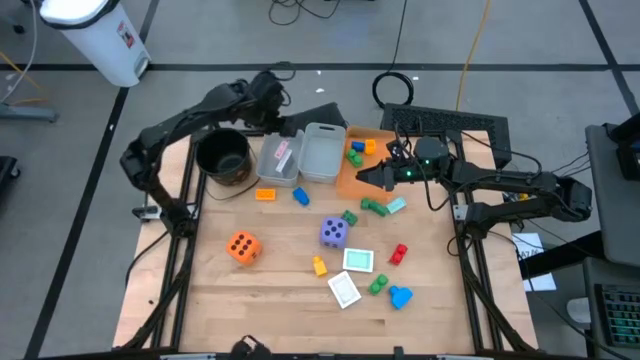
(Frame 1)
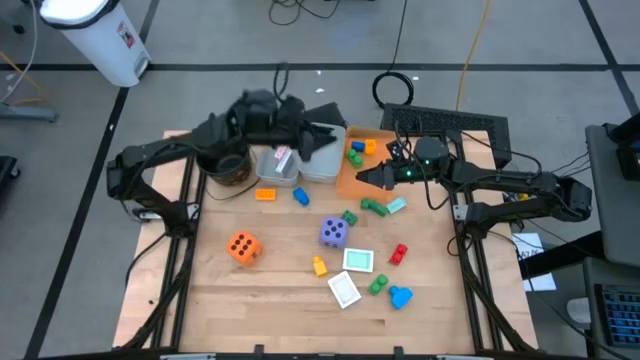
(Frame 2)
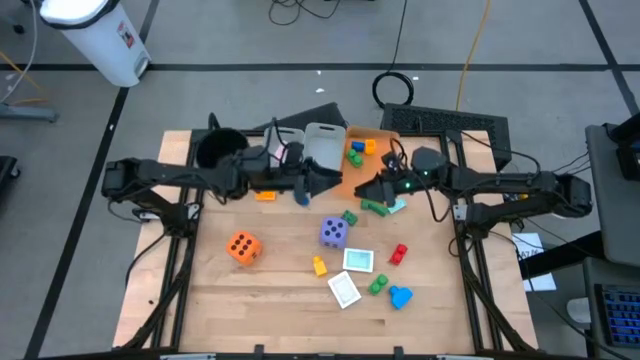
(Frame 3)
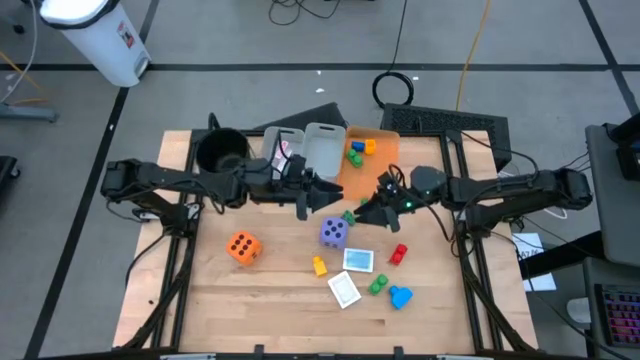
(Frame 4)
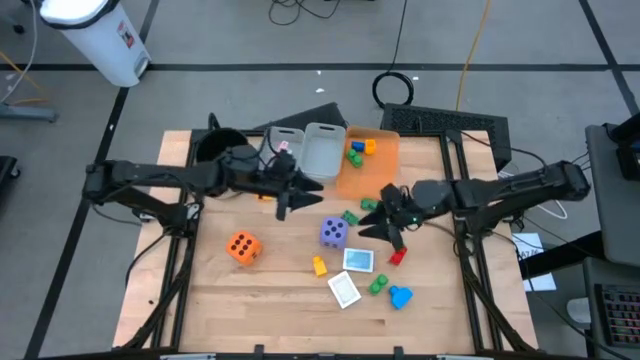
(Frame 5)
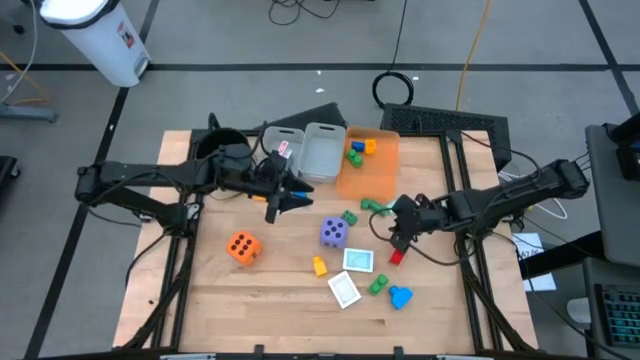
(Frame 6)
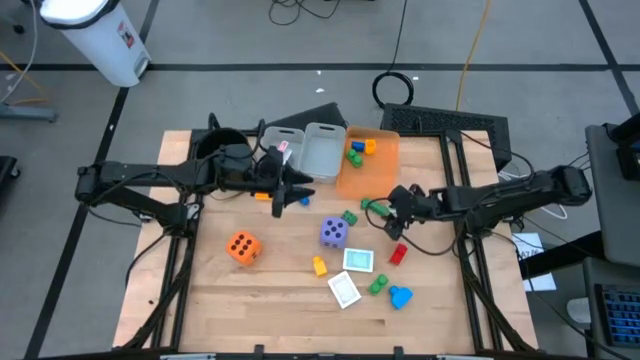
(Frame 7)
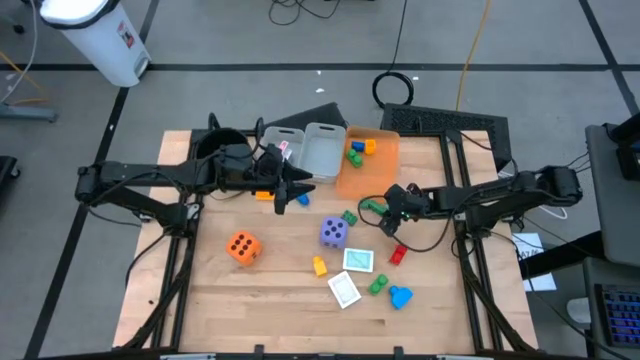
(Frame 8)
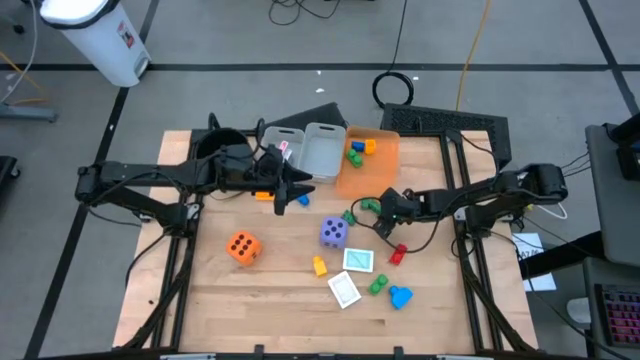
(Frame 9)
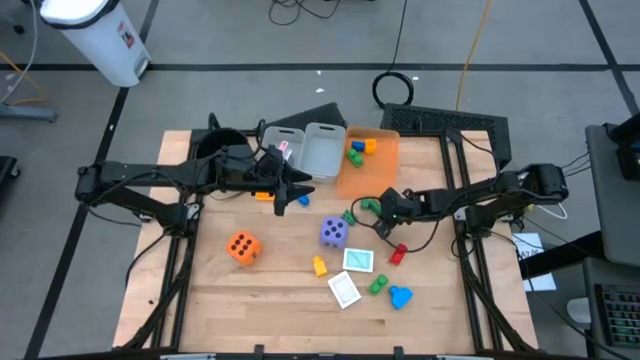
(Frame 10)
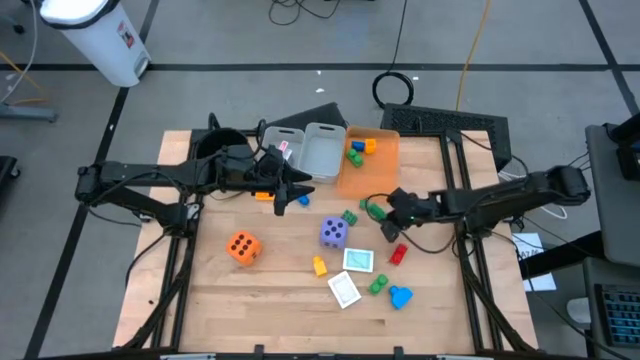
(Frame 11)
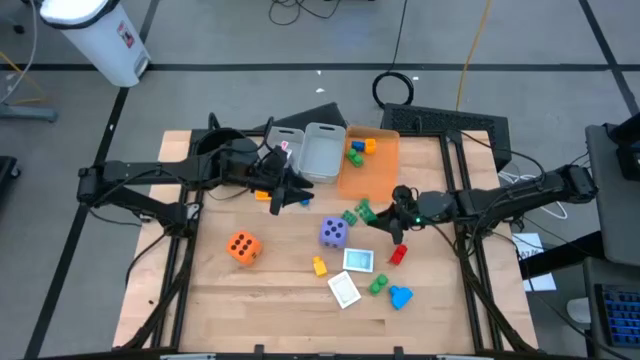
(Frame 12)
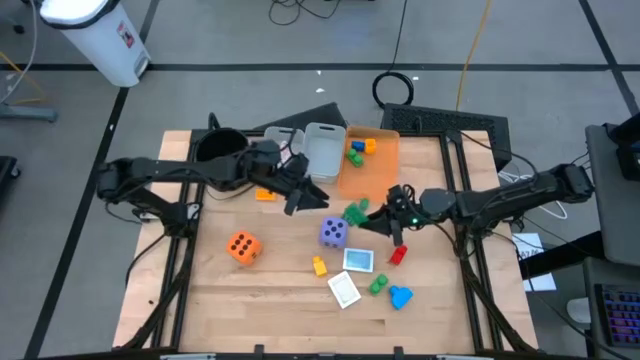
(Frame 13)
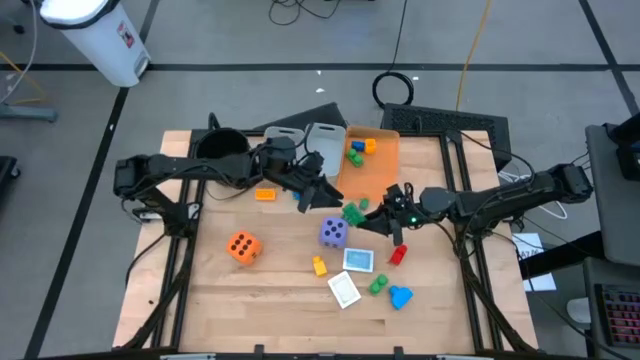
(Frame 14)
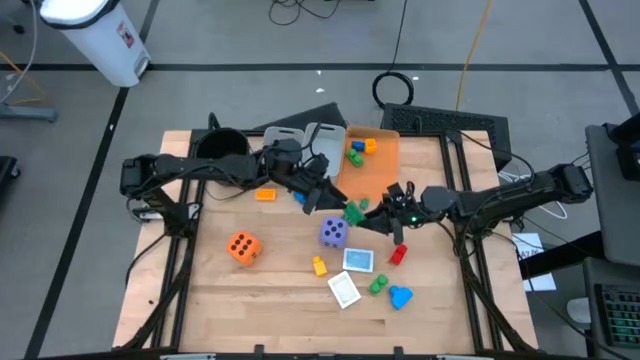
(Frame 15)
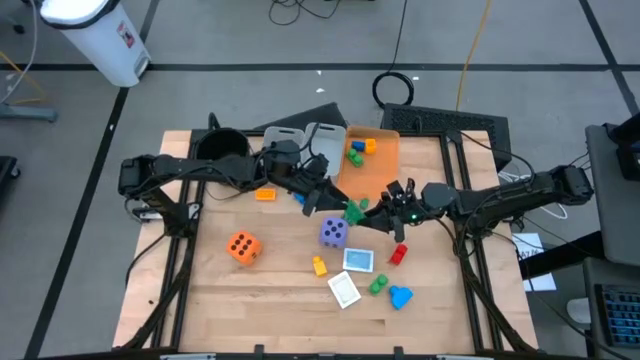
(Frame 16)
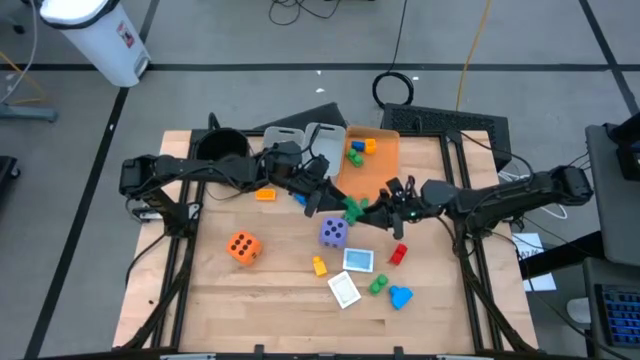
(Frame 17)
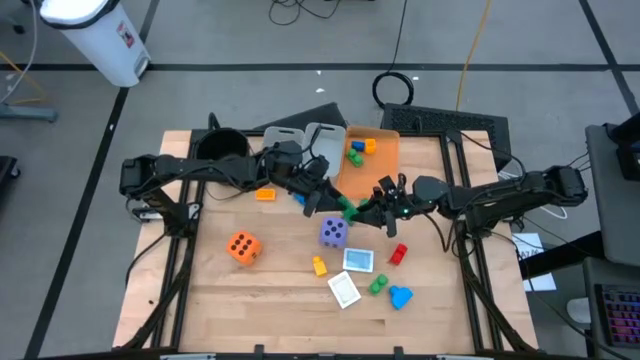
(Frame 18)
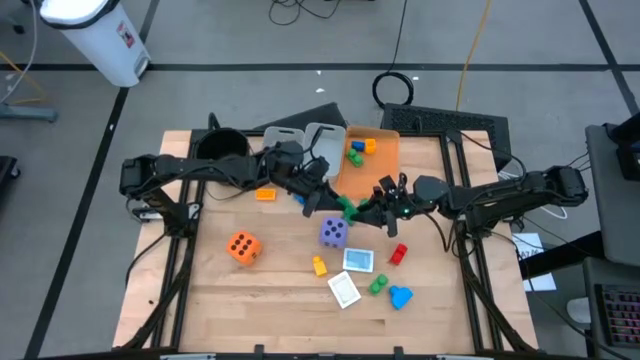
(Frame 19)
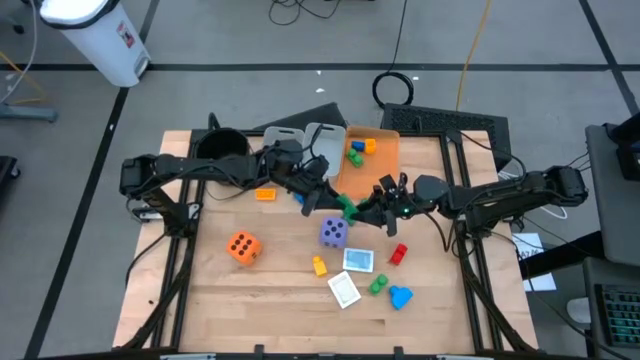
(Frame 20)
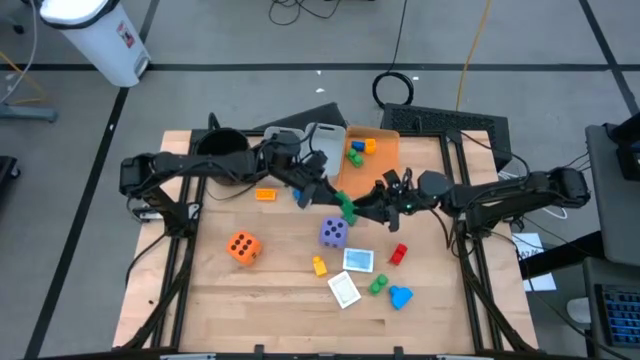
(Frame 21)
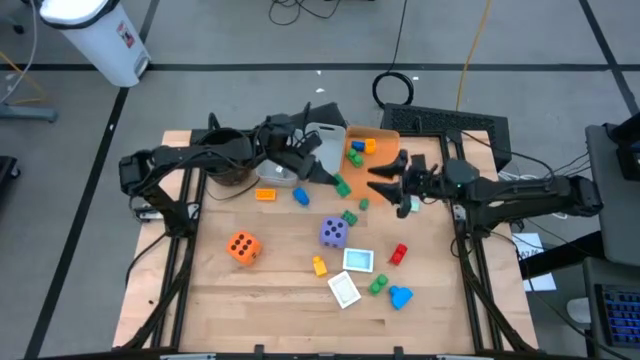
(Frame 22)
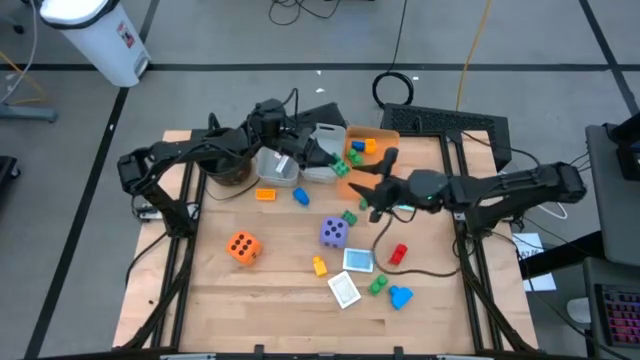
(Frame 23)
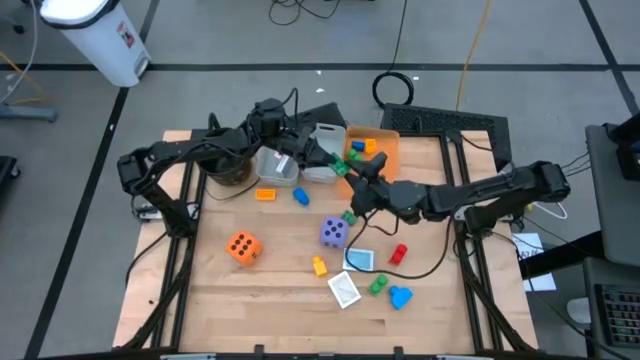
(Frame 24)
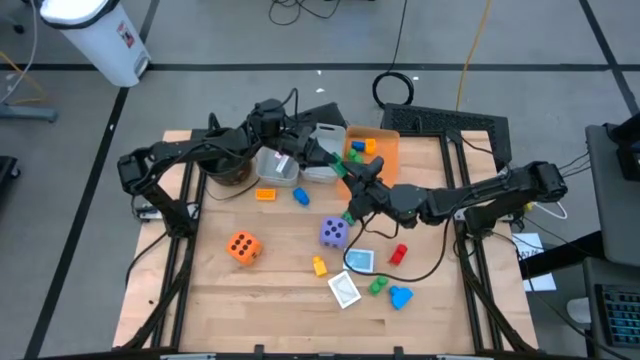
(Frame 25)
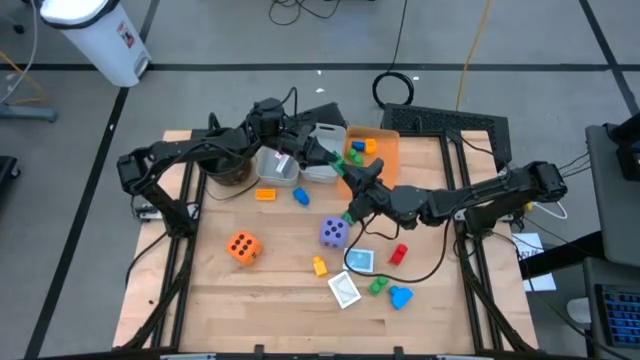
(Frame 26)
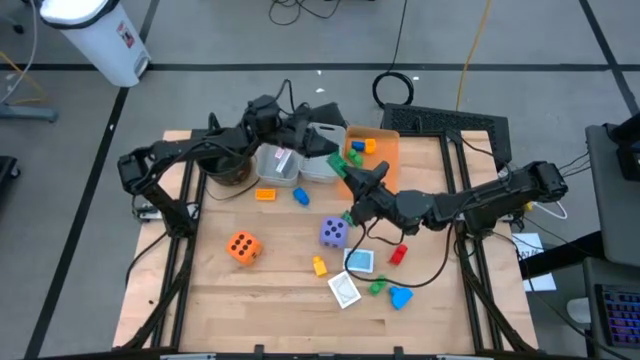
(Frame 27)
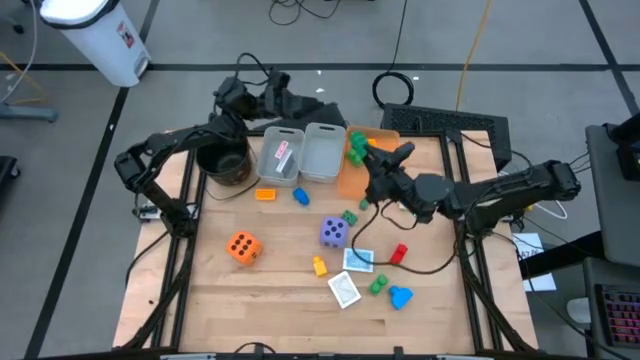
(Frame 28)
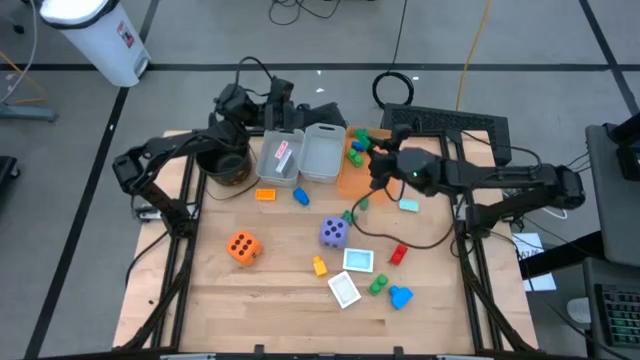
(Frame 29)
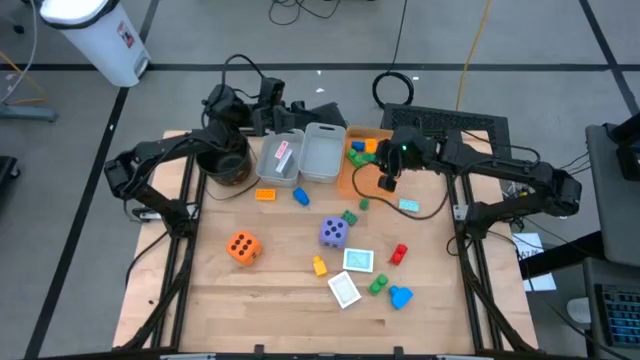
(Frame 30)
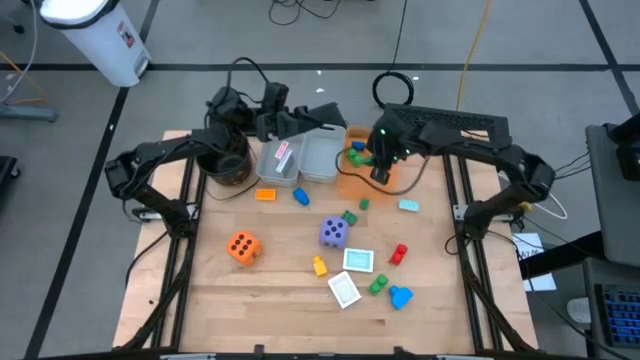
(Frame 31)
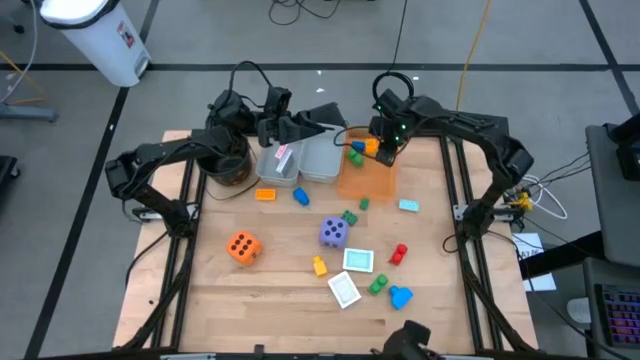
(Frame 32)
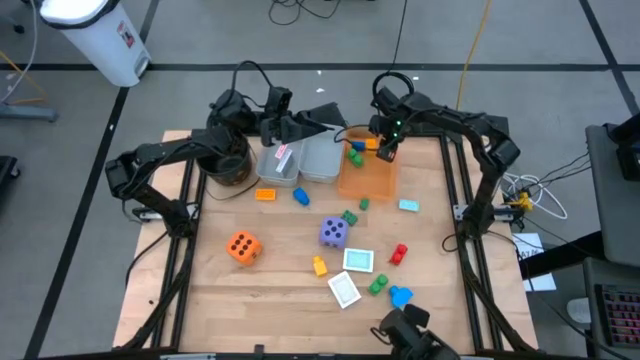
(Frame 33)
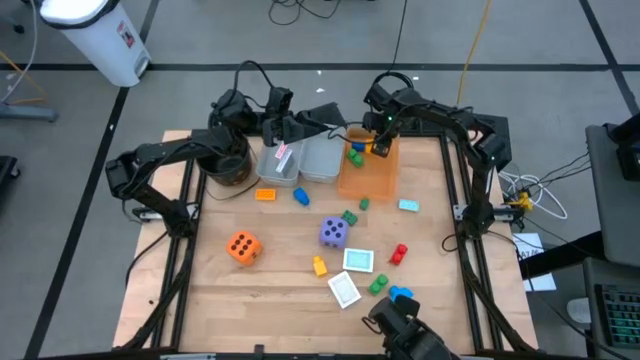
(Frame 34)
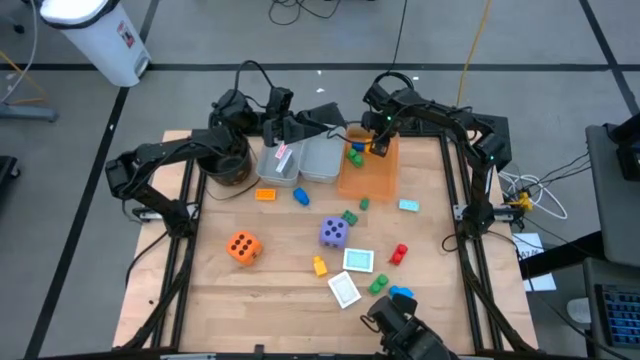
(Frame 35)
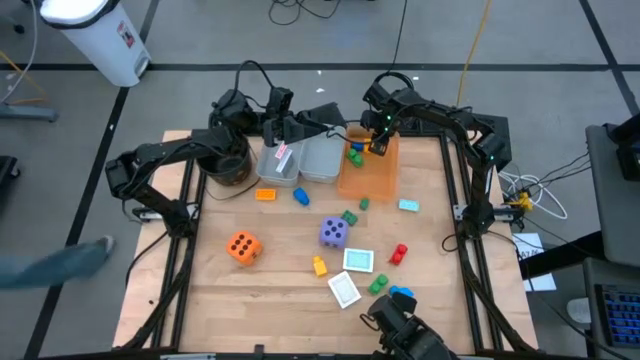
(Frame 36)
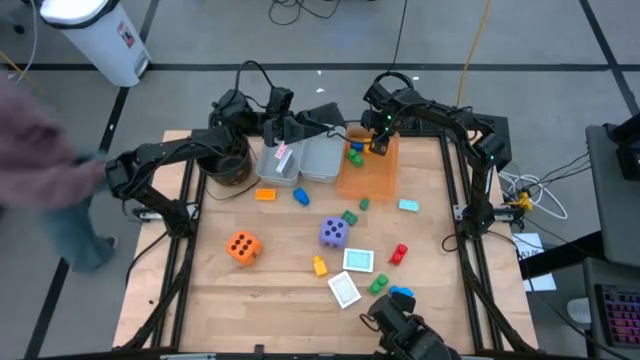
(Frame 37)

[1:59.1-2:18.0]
Task: Pick & Place Toys
Put the top right green game piece into the orange bin
